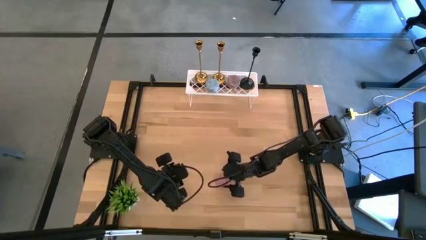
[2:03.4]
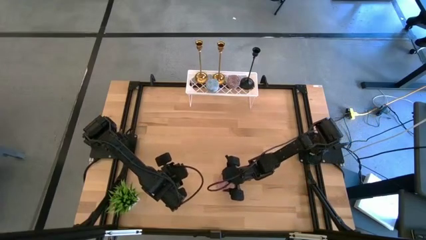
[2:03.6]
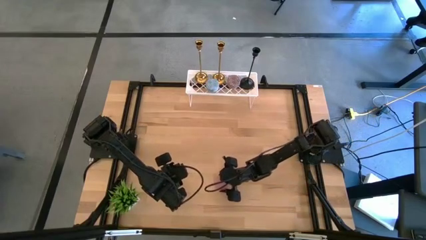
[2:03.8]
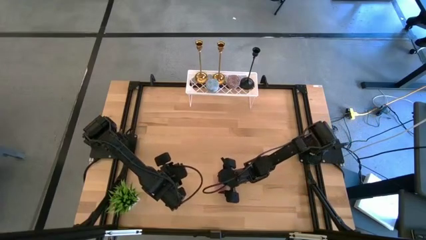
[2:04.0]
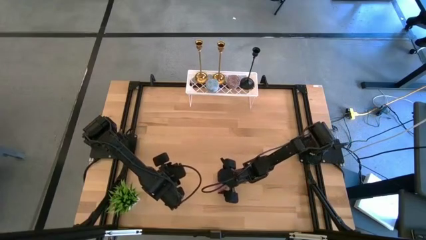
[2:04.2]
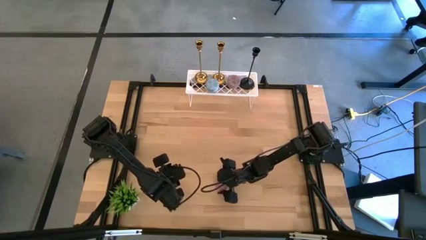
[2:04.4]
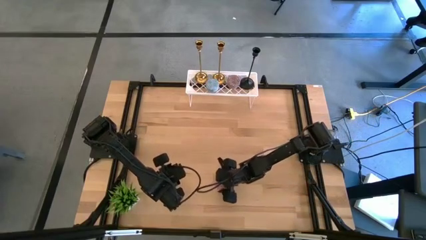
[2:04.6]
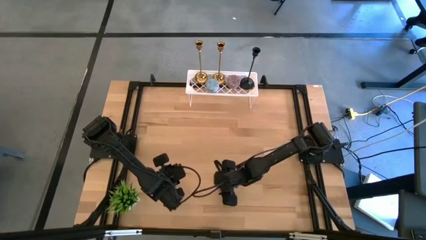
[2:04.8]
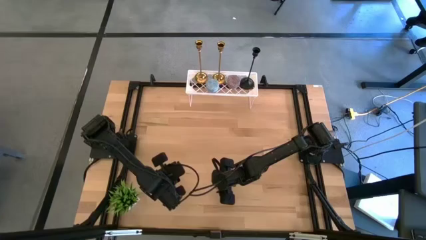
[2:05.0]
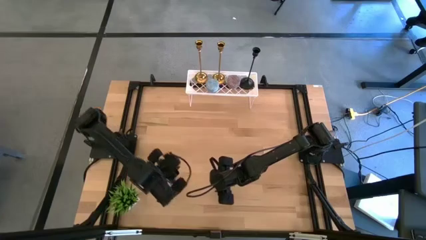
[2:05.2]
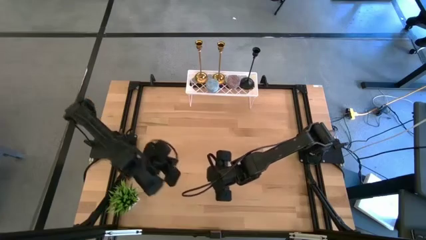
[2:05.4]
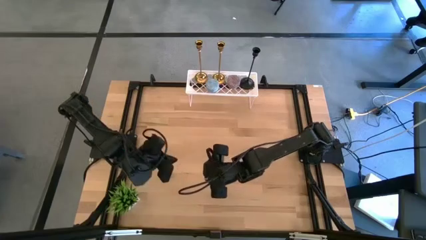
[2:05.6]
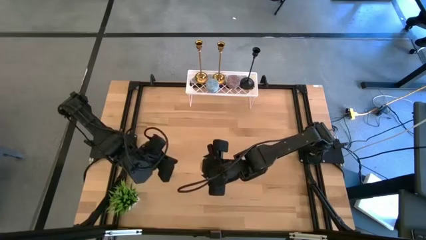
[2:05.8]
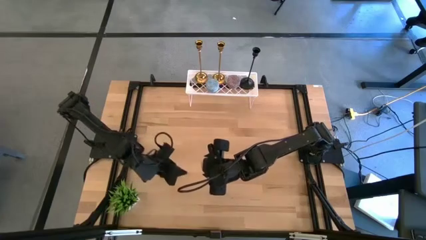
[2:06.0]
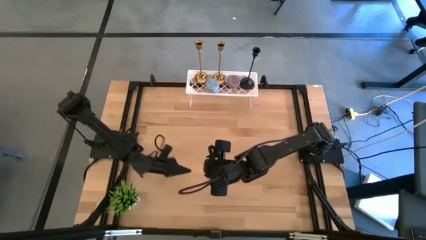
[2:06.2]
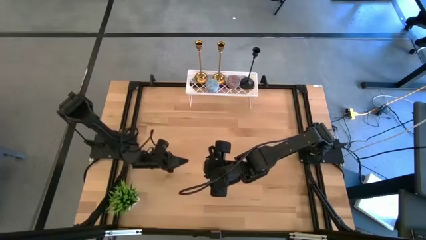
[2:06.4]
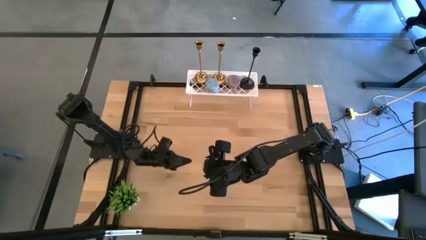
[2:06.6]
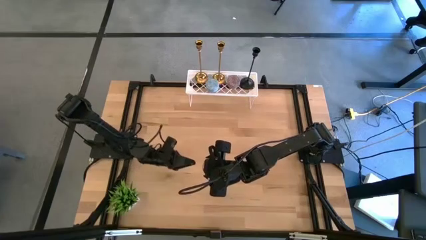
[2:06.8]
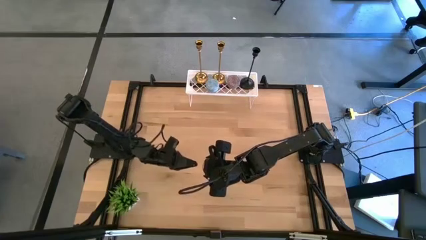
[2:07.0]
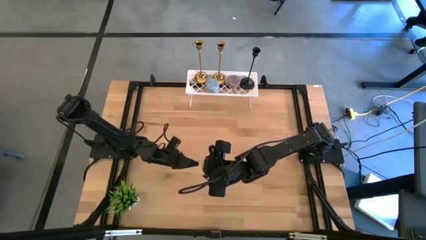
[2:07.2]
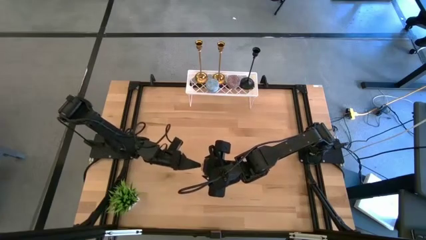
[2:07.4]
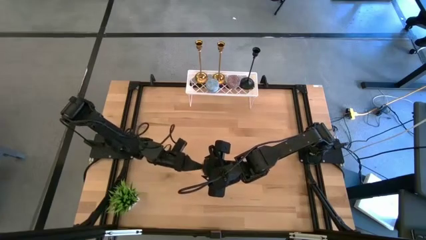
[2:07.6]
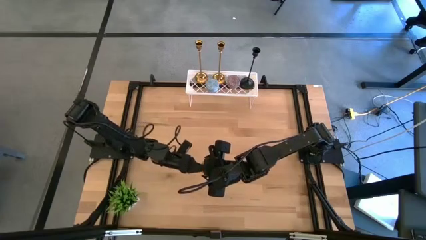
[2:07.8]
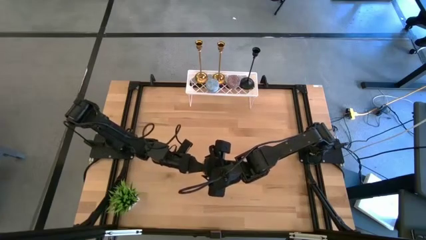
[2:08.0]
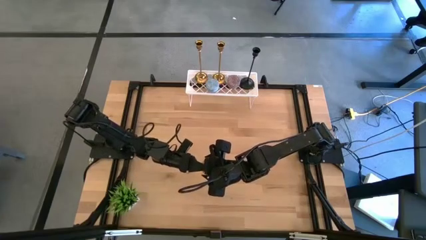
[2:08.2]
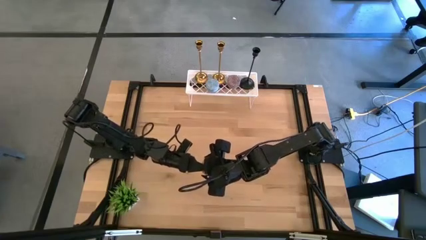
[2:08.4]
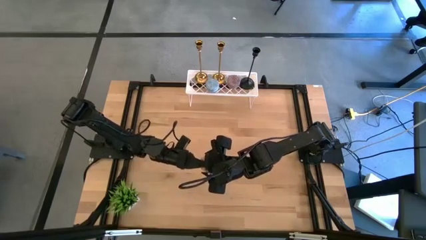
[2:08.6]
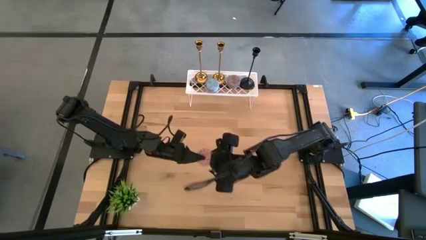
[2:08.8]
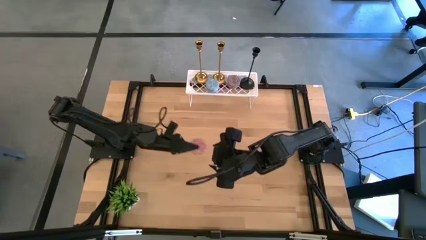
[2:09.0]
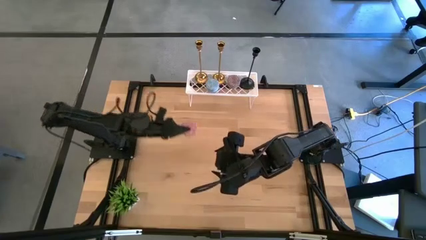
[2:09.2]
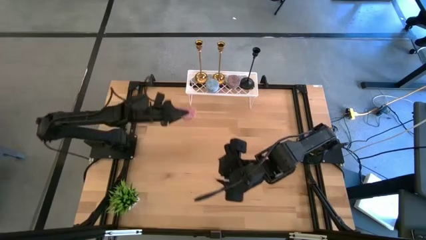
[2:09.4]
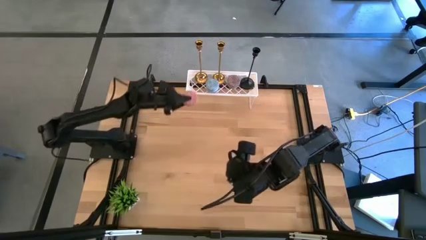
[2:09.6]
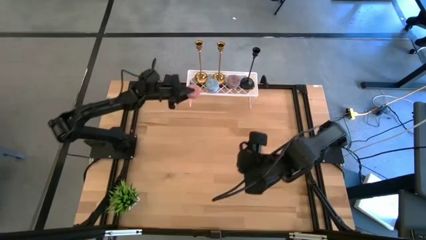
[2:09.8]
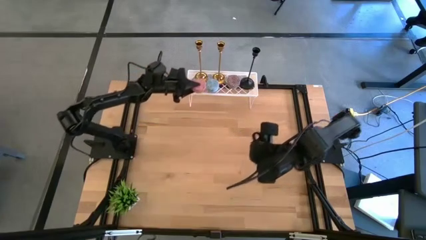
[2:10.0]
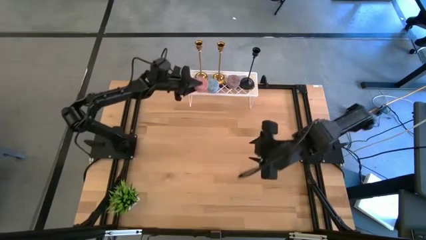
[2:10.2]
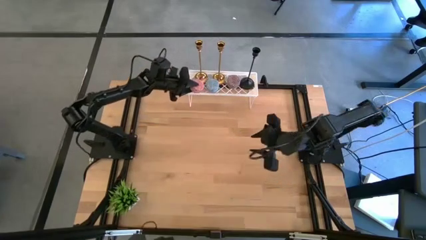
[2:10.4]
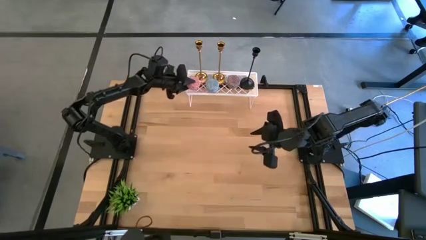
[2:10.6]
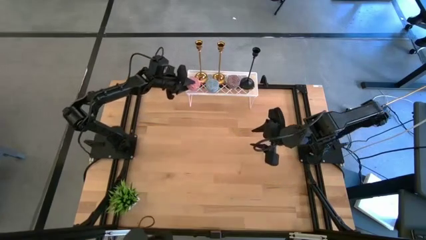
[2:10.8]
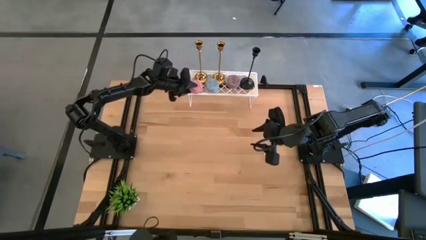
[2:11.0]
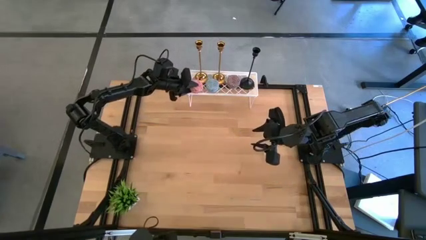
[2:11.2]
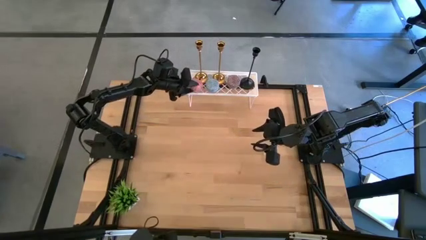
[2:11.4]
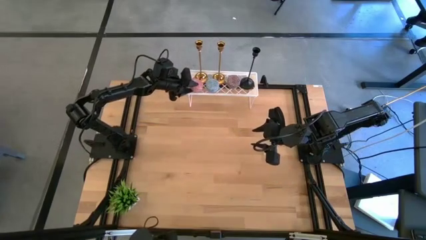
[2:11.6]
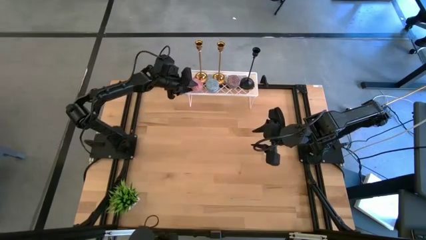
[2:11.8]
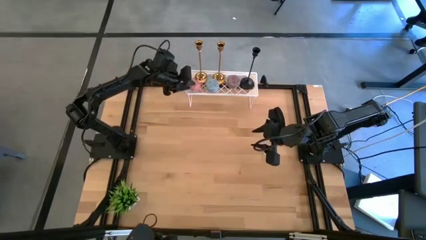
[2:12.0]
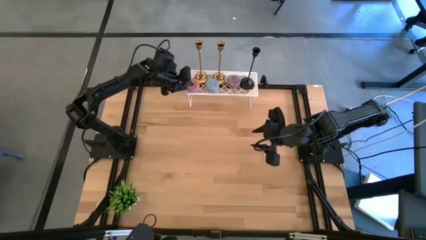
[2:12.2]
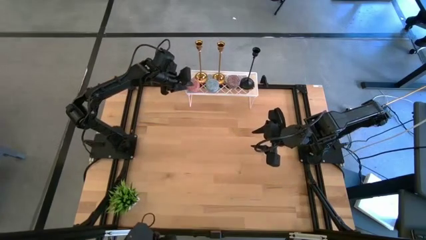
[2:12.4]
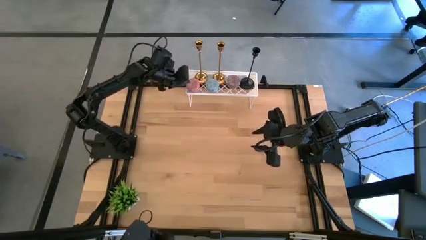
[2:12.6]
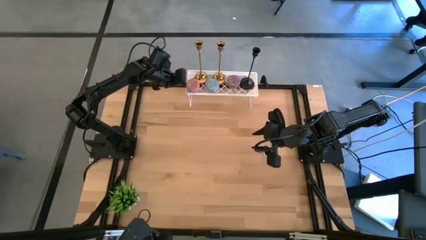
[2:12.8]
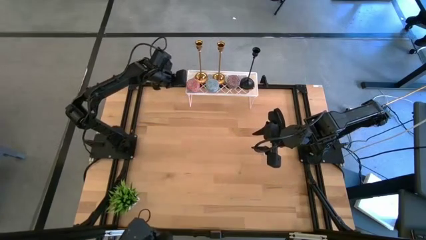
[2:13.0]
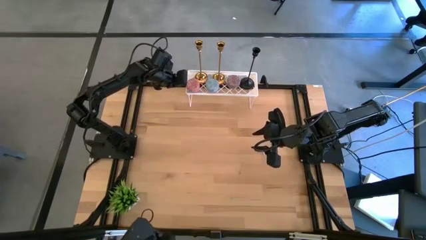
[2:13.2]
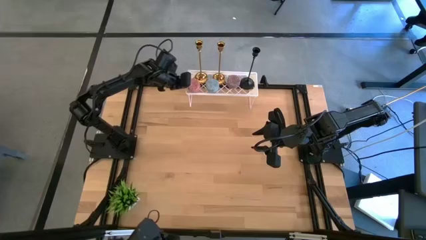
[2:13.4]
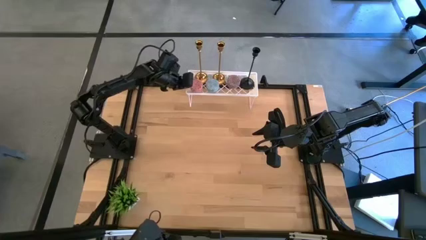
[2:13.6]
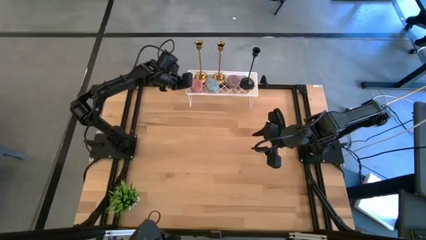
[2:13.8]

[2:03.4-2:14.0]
Task: Pick & Place candle stick holders
Put the scented candle on the shelf
